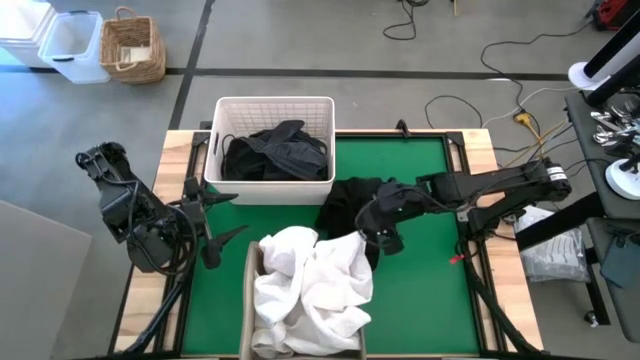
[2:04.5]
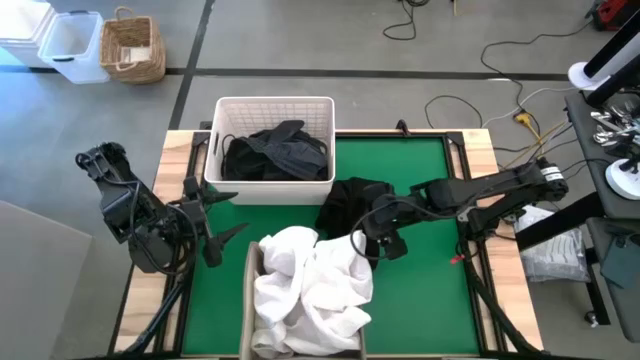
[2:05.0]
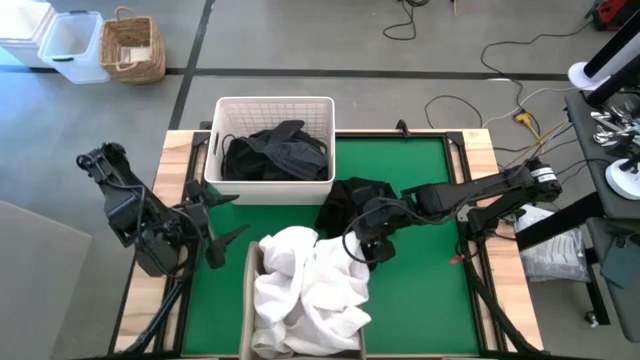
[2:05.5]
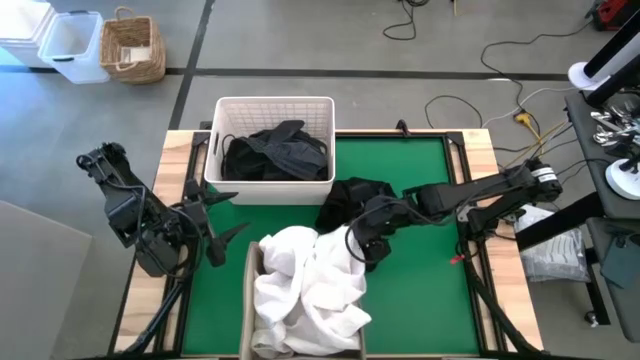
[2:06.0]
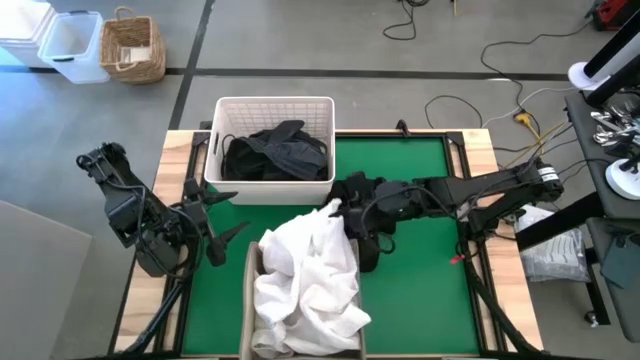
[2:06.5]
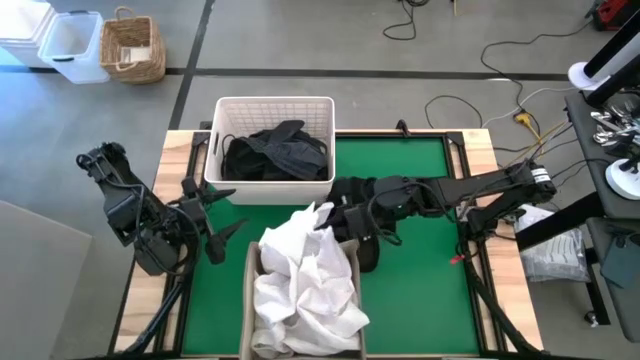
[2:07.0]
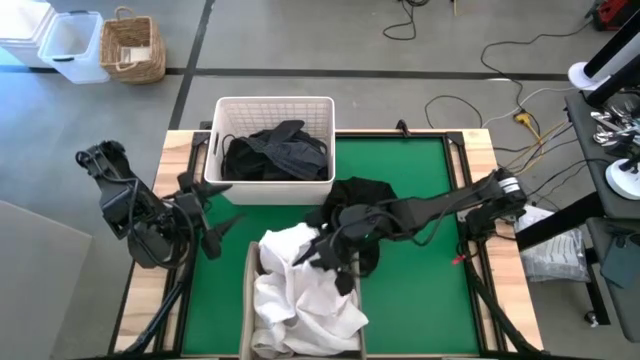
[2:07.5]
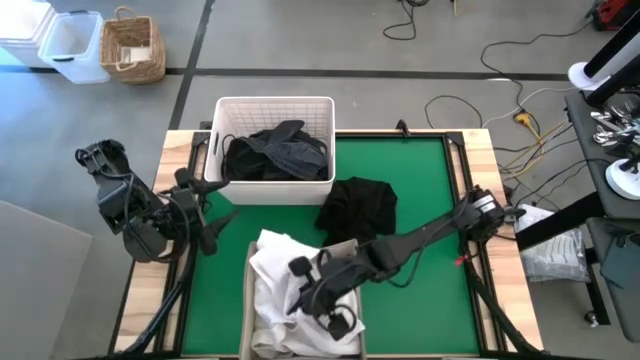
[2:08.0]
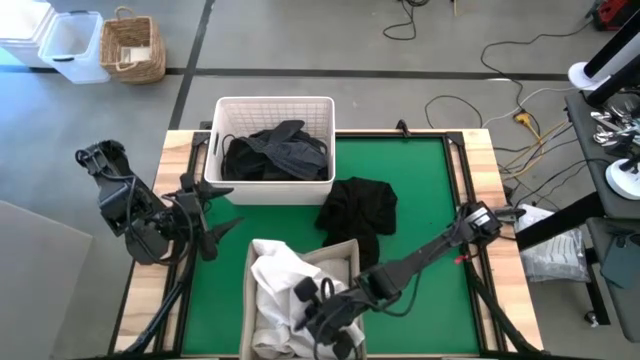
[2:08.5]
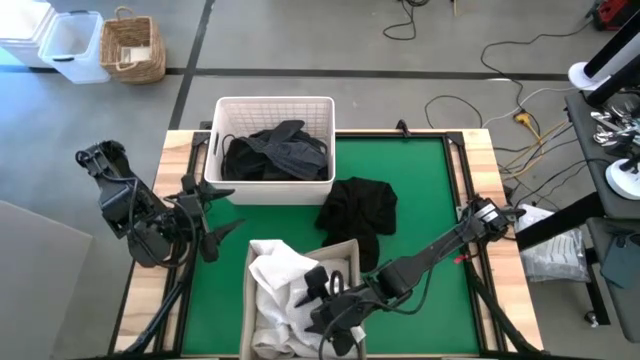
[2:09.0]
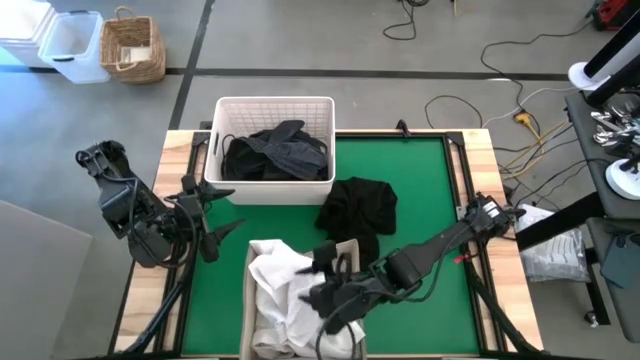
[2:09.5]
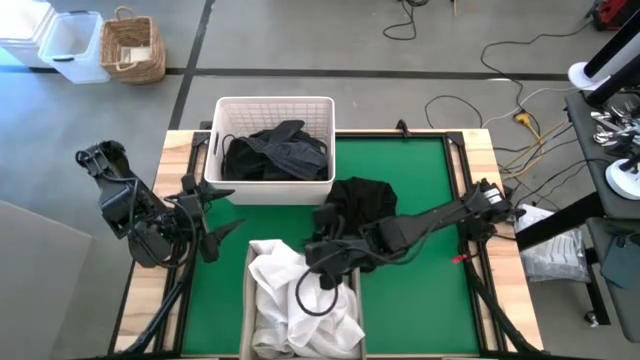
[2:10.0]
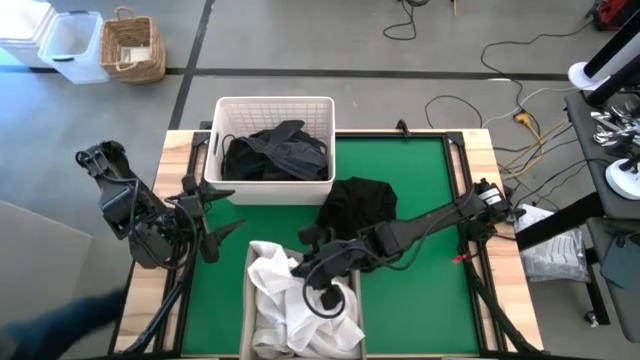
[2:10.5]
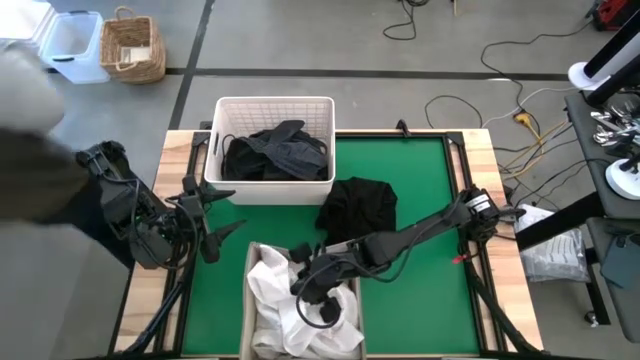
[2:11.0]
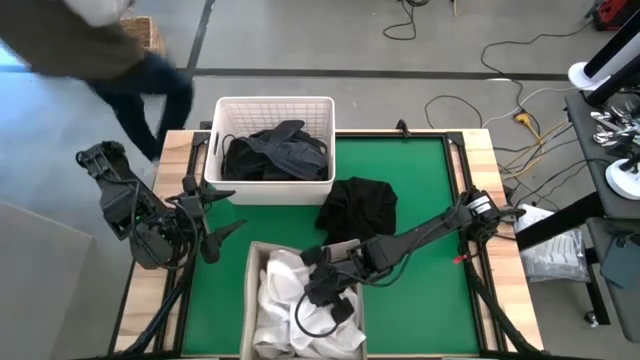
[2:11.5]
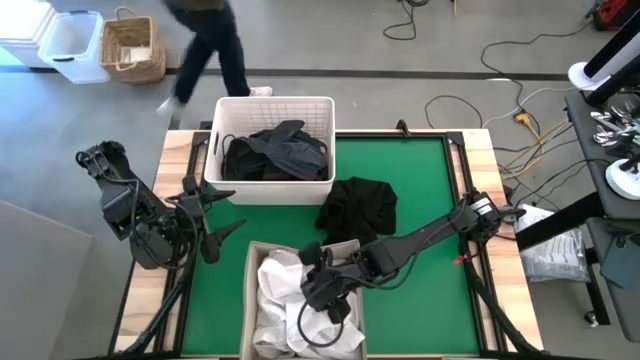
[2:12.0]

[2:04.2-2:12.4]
Put the white shirt into the laundry organizer

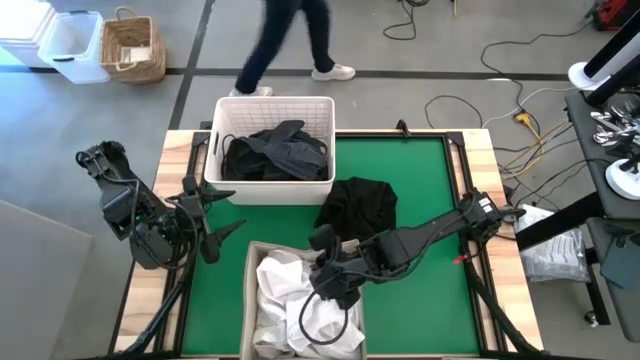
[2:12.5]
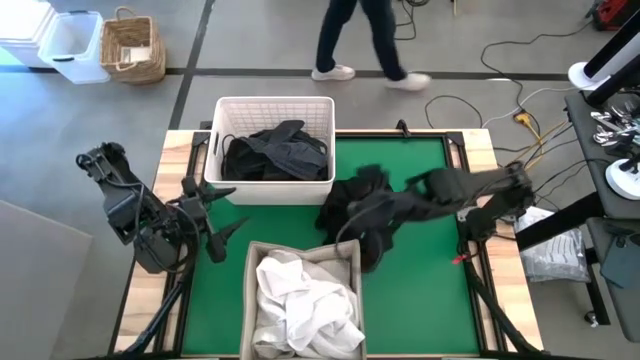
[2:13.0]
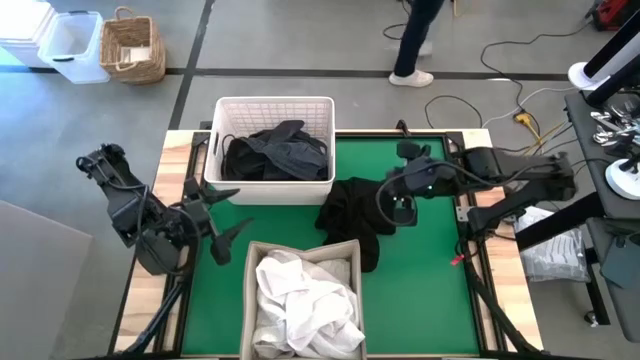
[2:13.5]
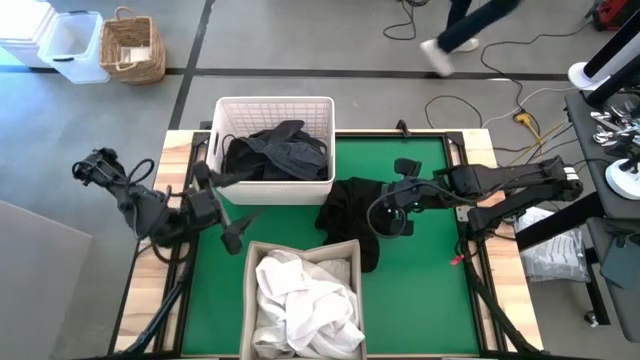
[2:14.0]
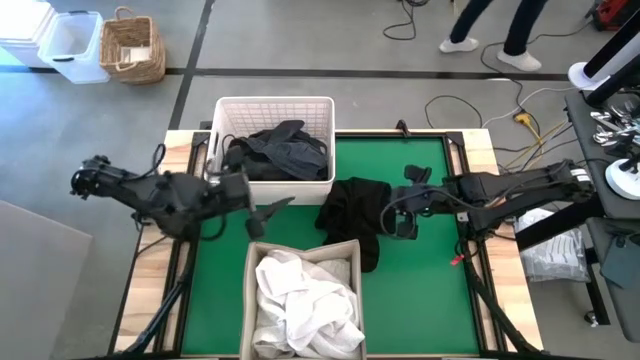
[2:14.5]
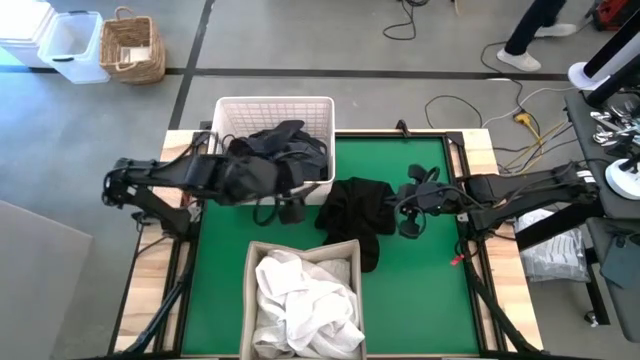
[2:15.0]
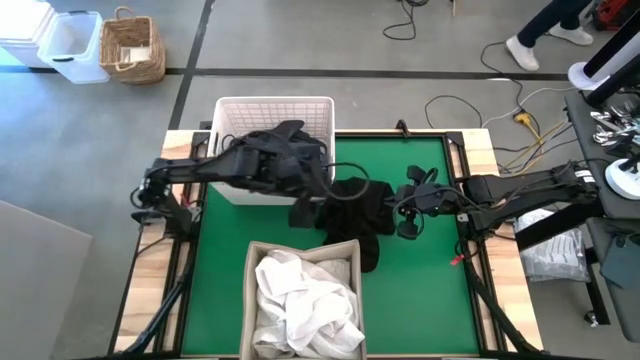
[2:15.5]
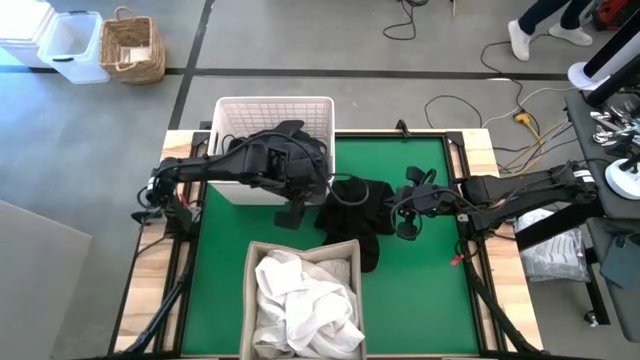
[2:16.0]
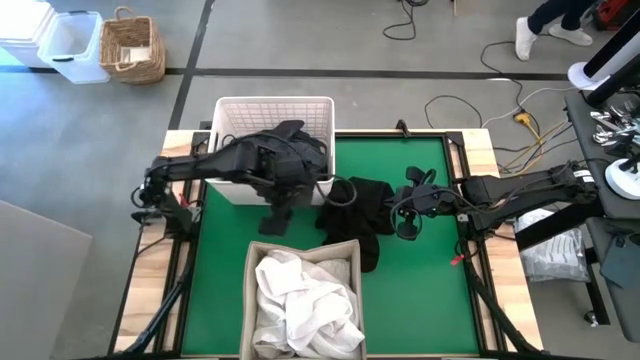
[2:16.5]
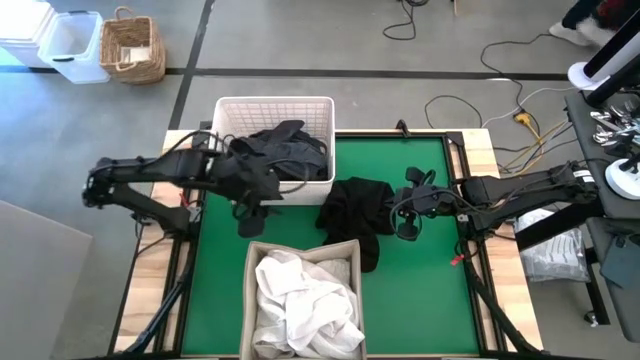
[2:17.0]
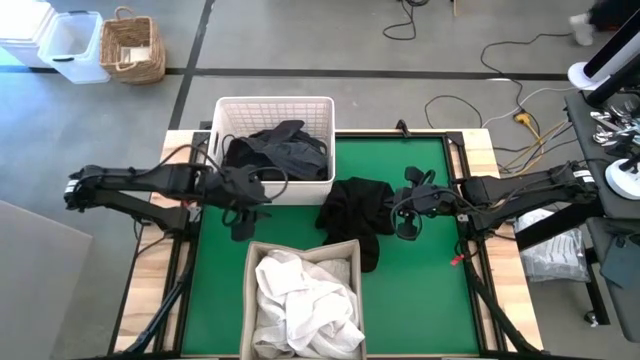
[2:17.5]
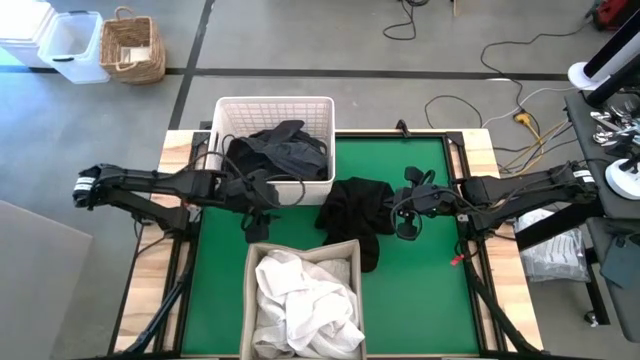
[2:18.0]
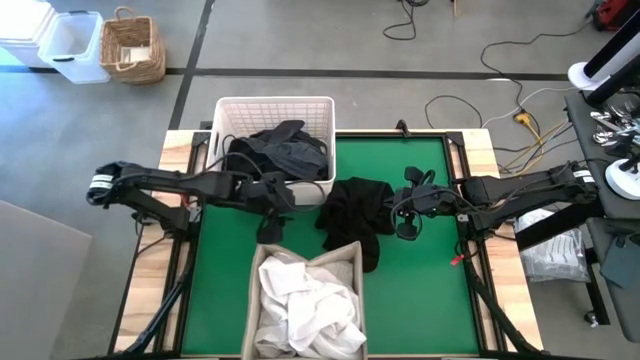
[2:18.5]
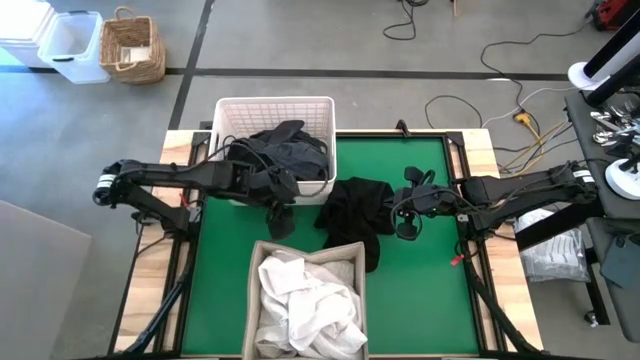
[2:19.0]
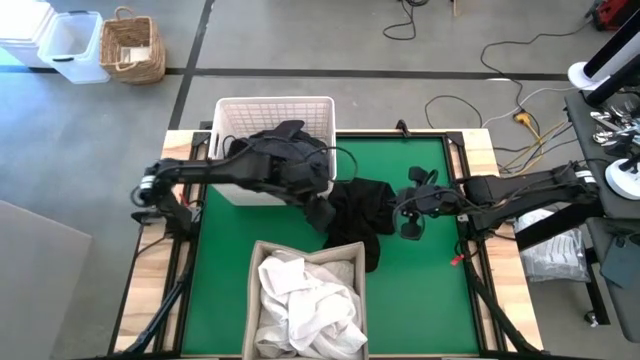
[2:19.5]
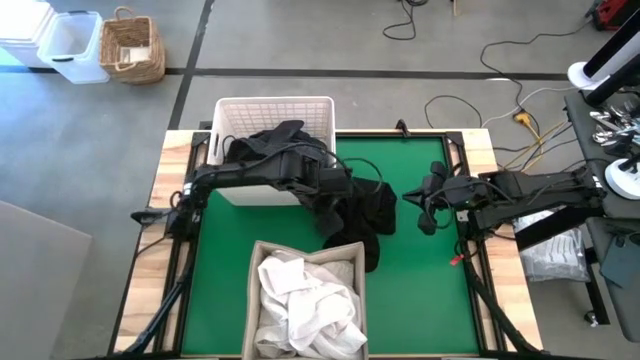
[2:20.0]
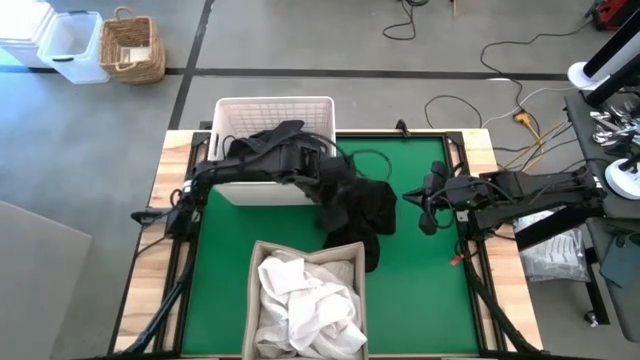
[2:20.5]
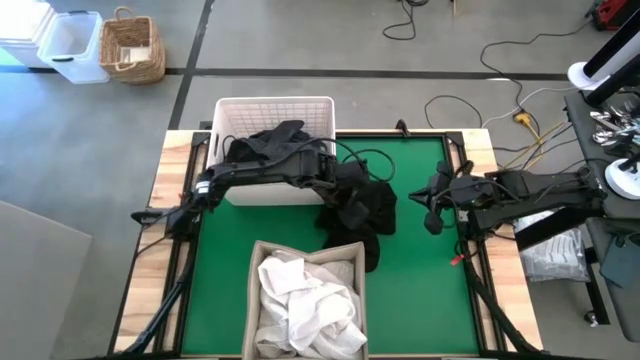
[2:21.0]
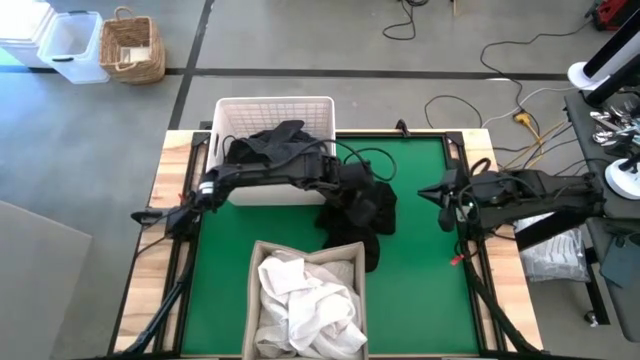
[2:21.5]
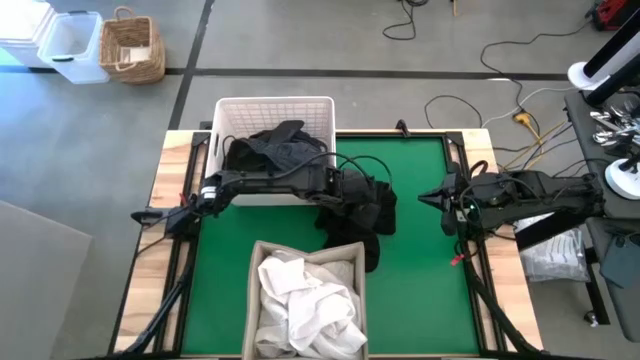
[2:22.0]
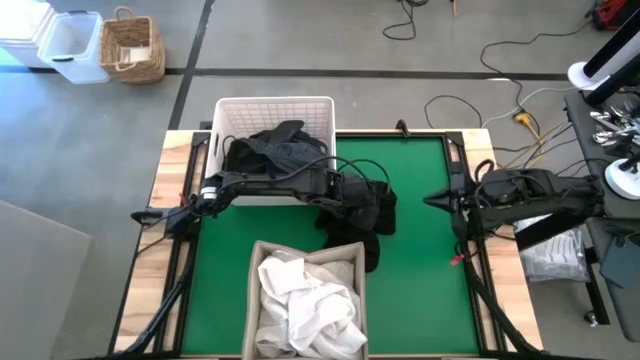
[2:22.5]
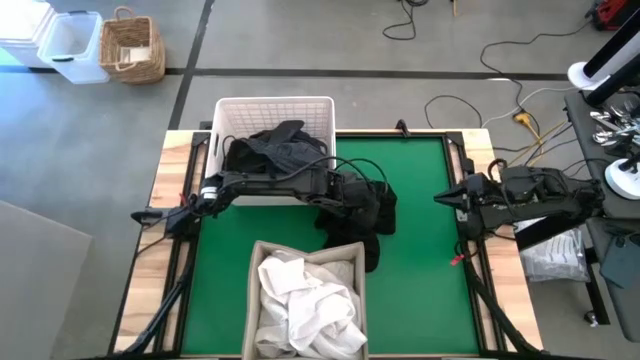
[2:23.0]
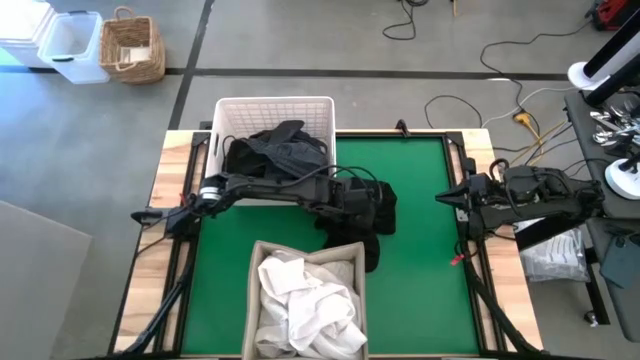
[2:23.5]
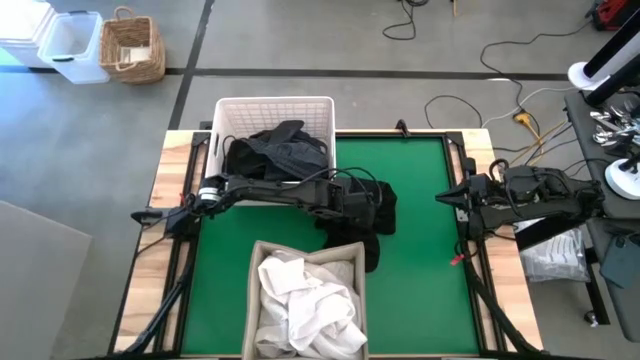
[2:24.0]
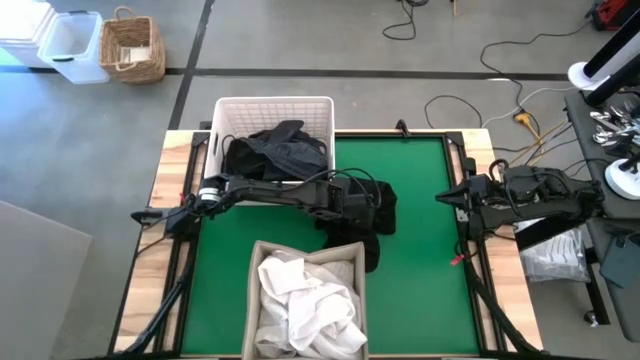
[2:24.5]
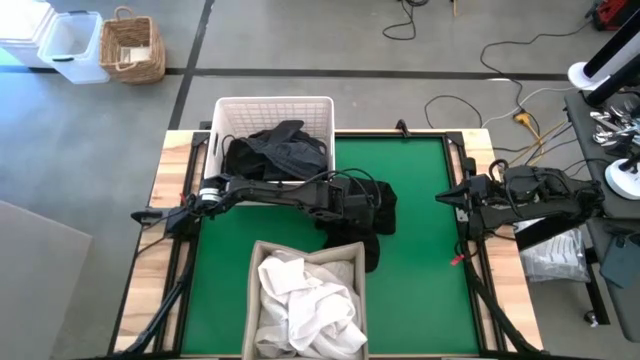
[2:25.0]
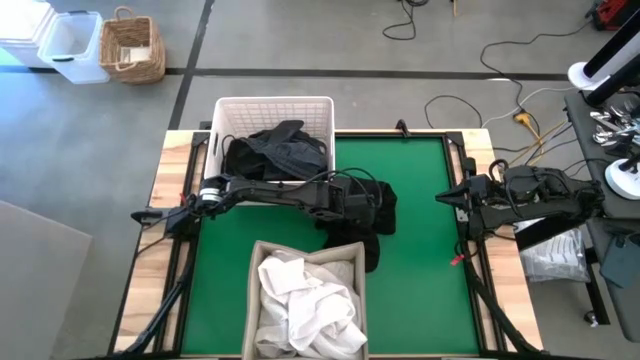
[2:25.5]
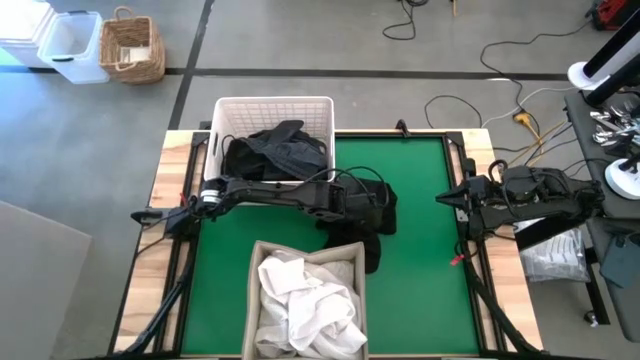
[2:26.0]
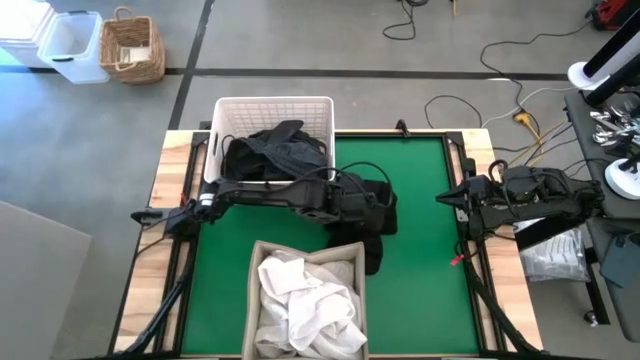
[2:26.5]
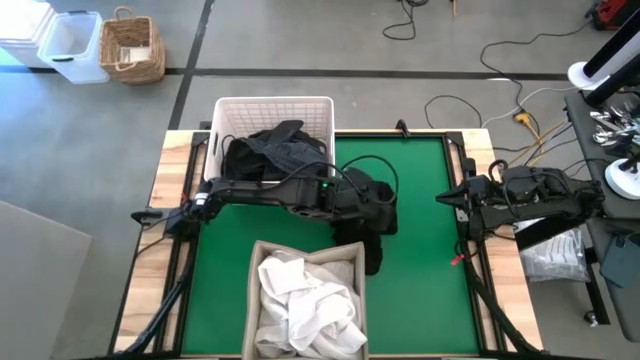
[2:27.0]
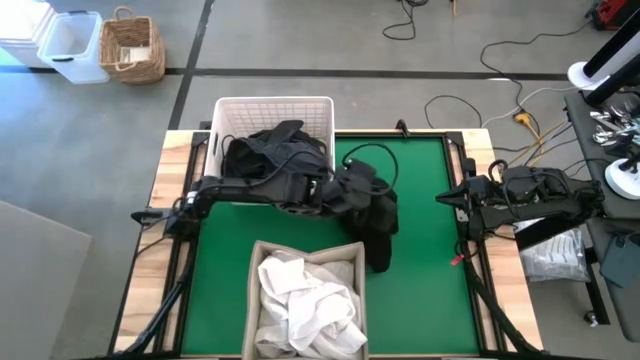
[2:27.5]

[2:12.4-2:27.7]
Put the black shirt into the white bin
